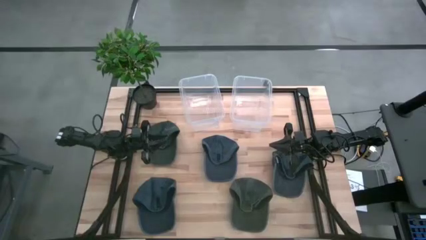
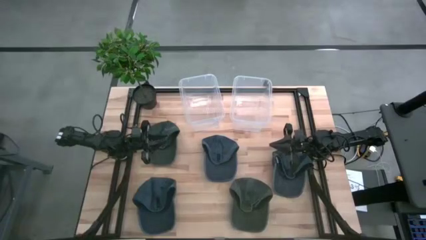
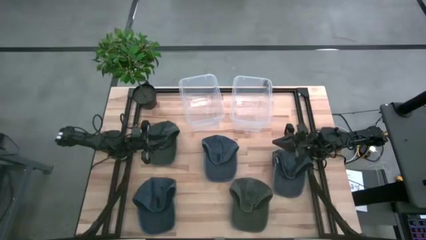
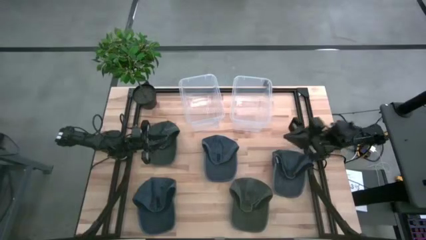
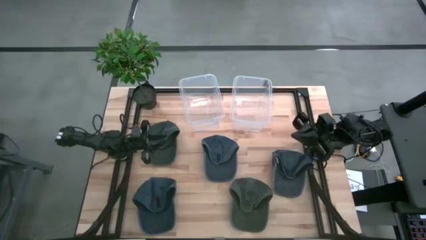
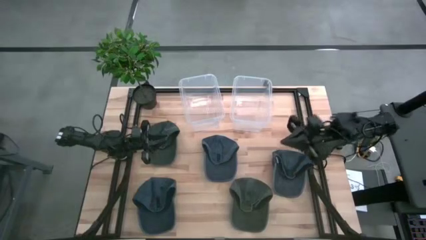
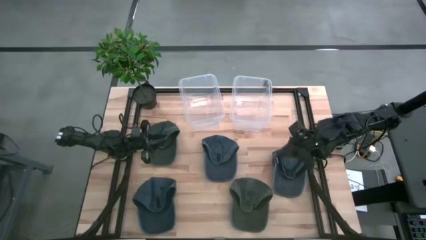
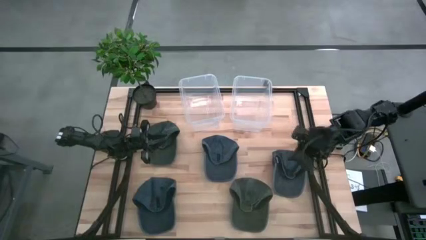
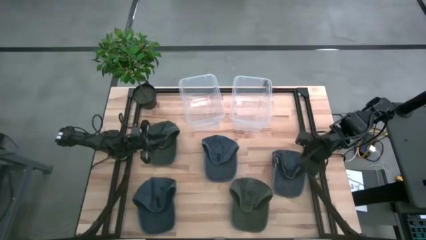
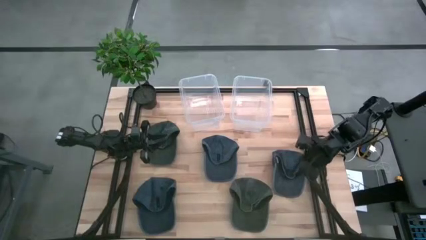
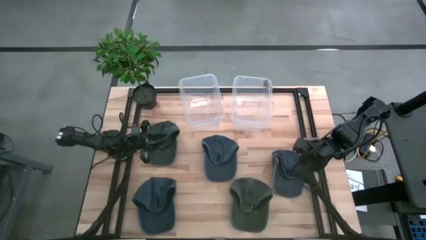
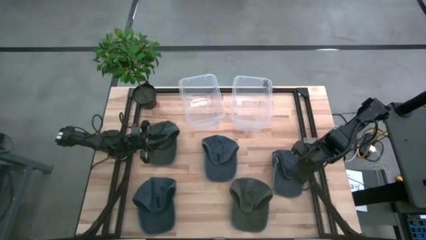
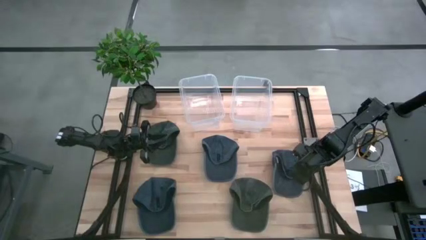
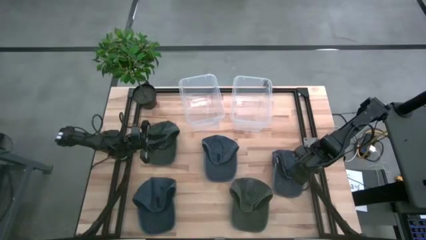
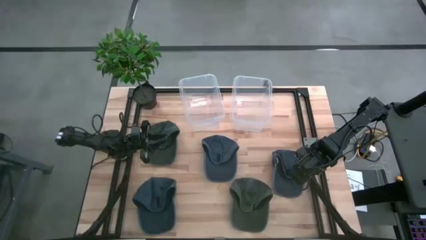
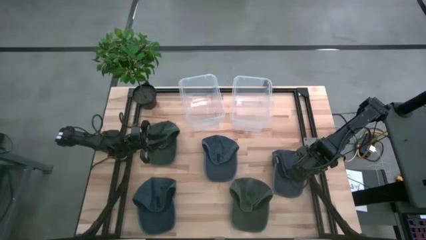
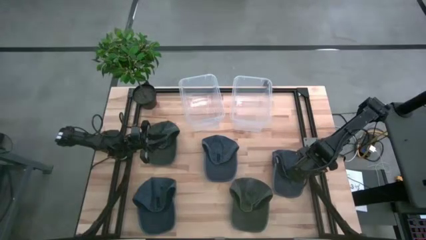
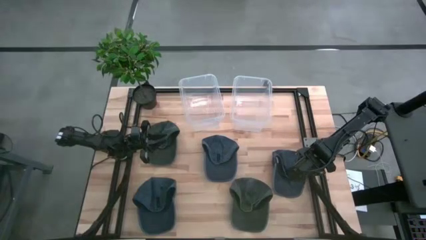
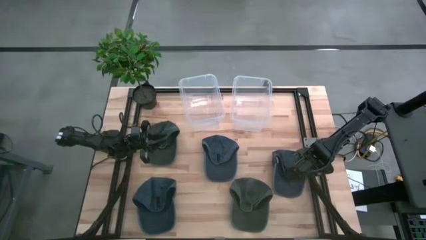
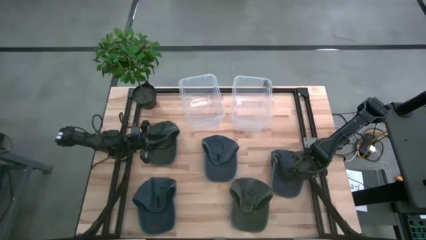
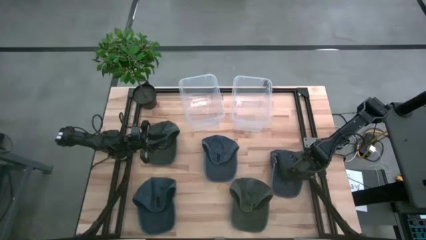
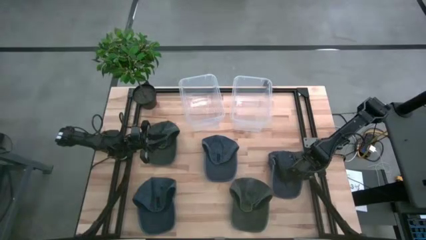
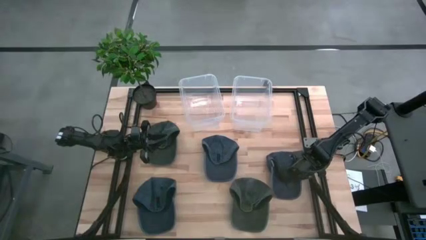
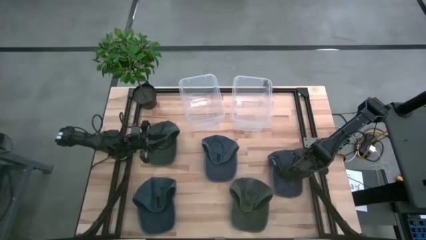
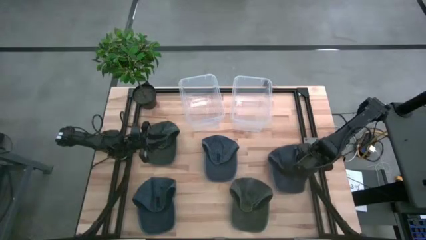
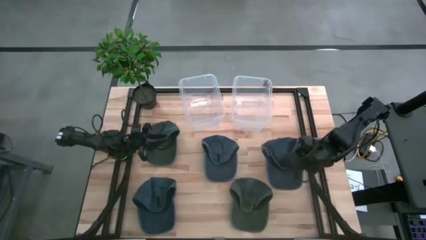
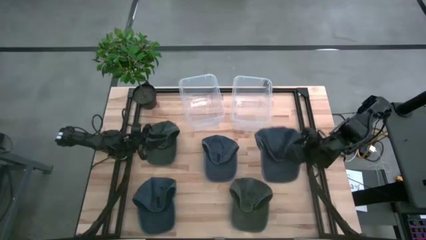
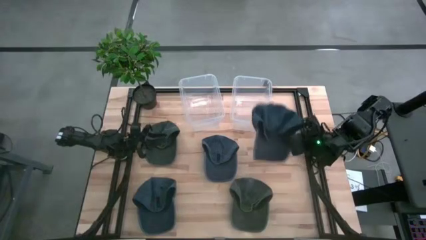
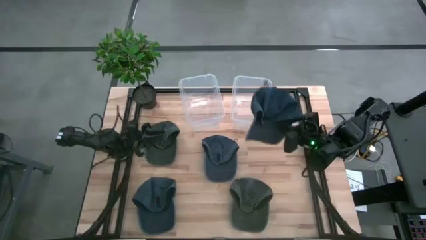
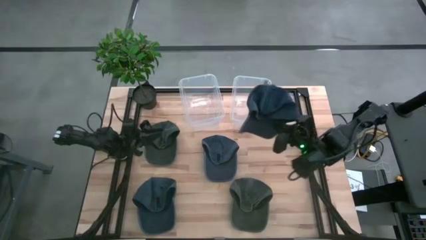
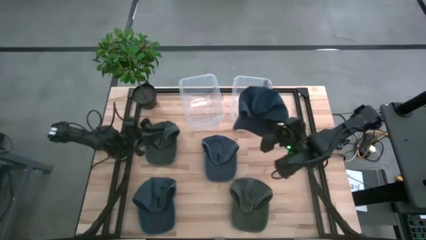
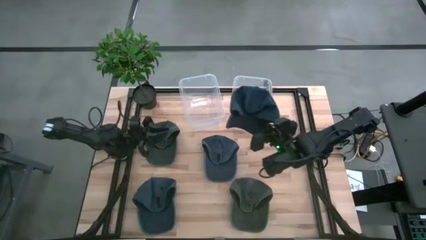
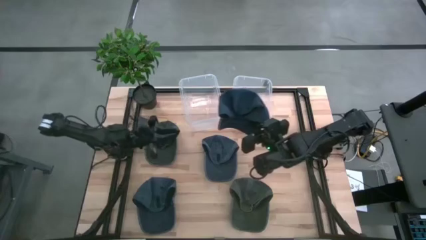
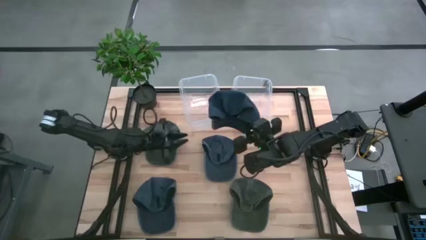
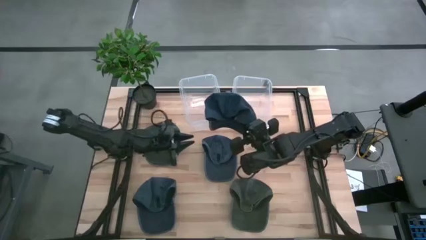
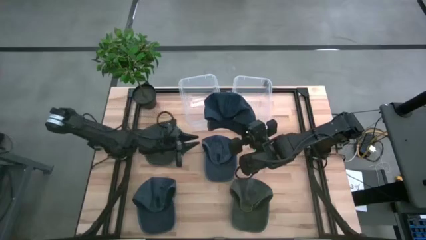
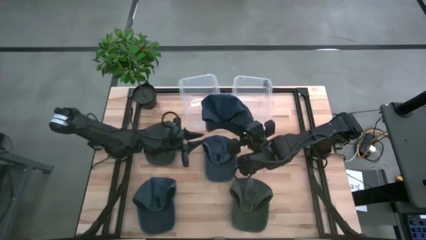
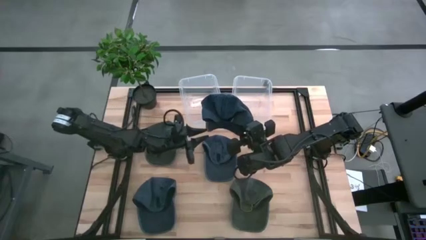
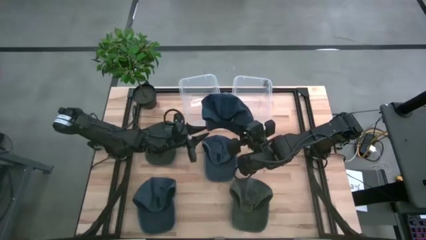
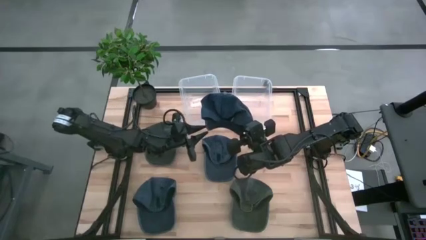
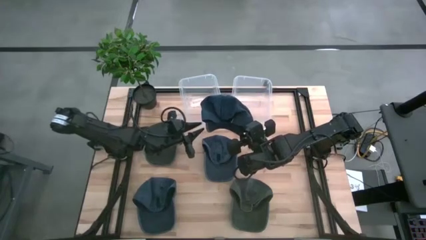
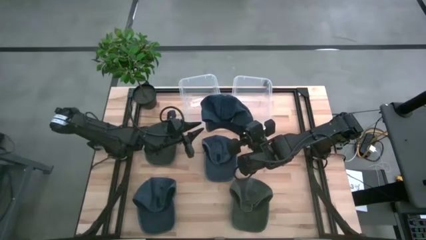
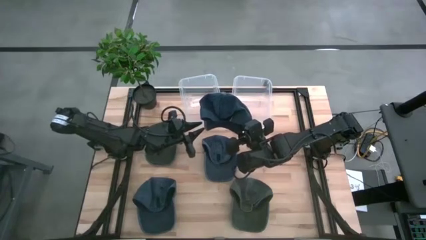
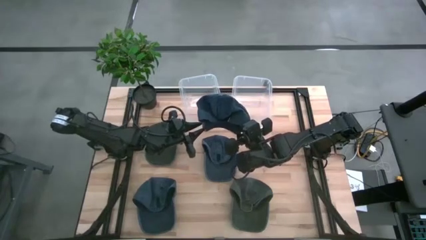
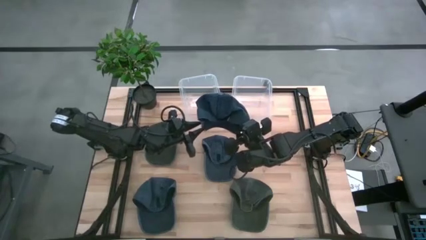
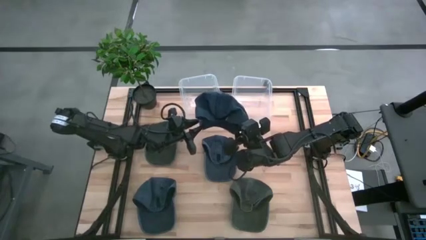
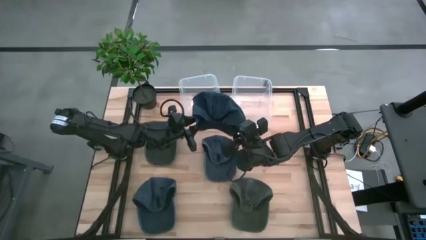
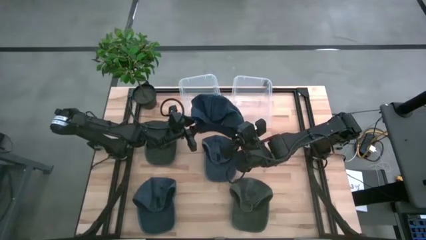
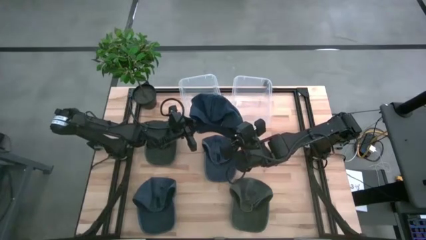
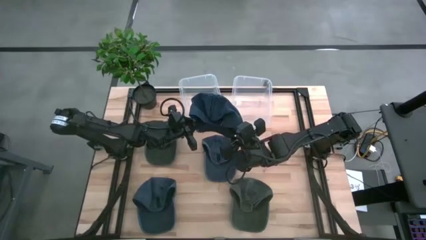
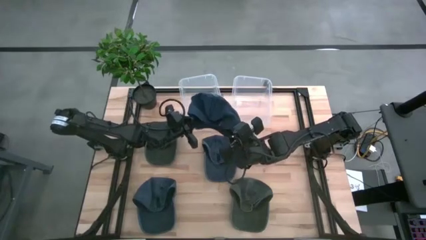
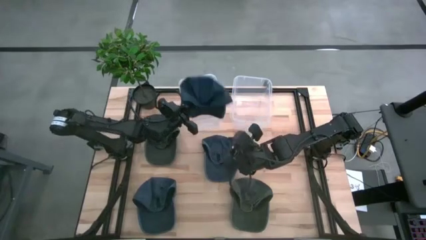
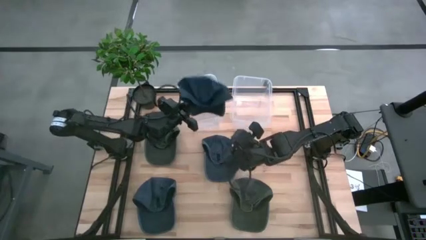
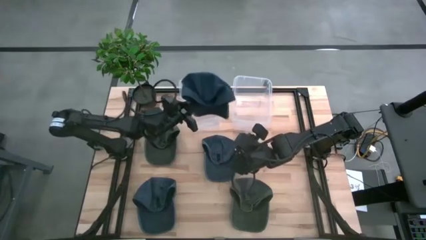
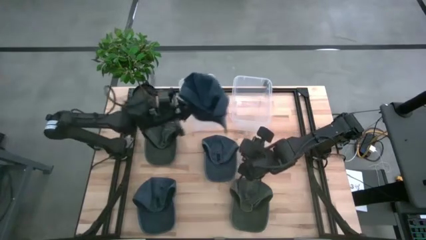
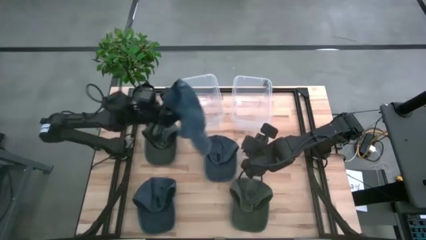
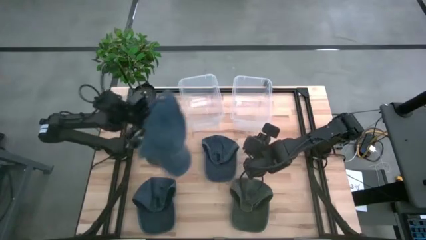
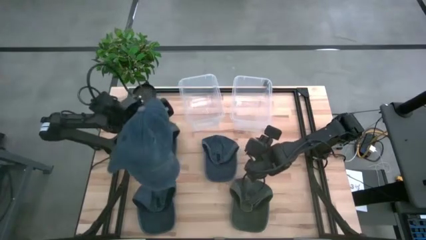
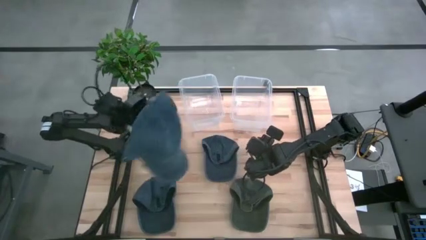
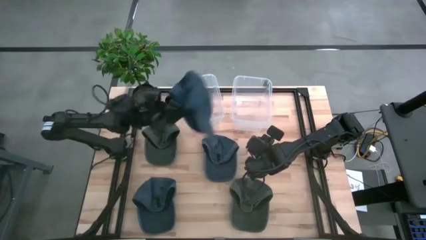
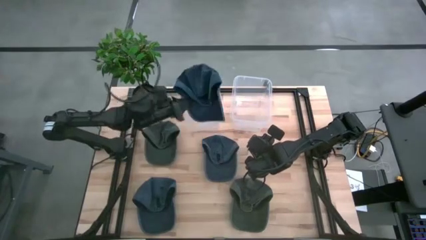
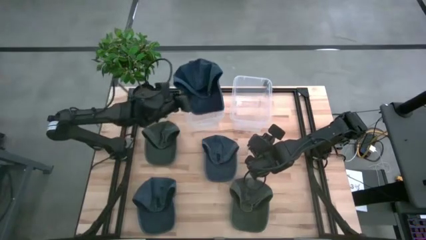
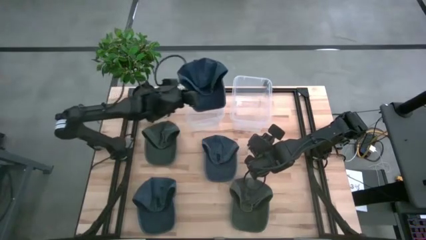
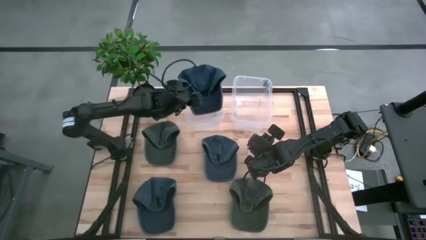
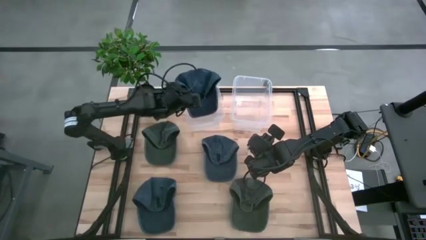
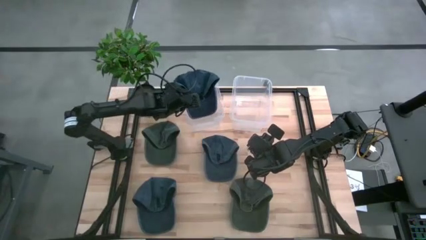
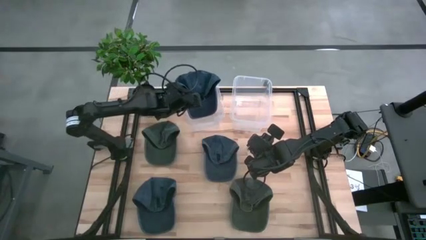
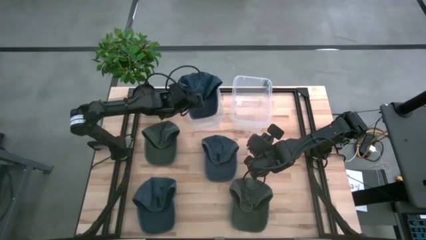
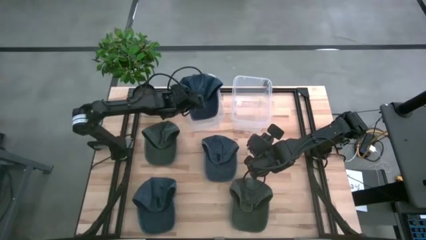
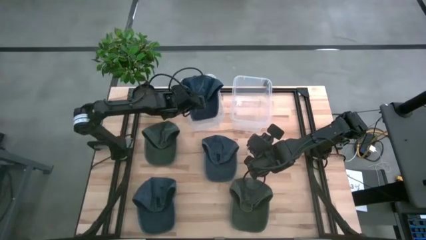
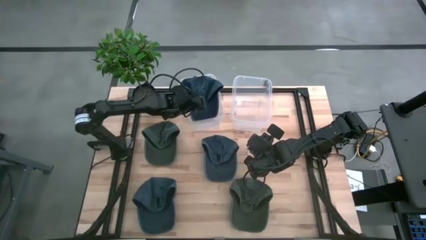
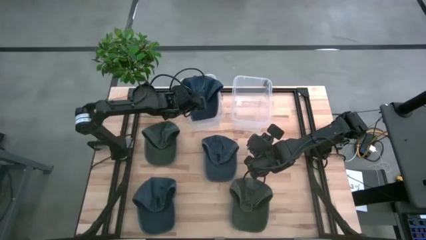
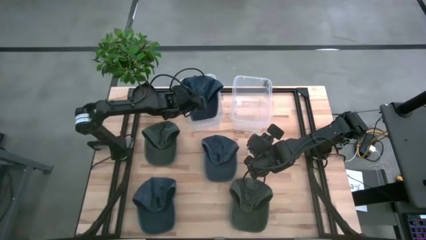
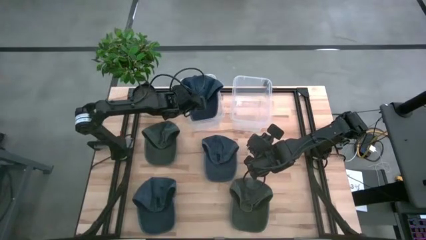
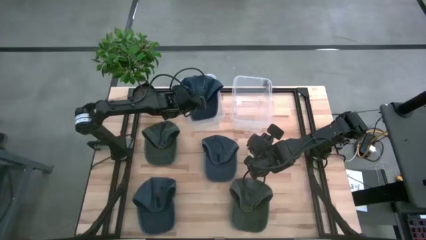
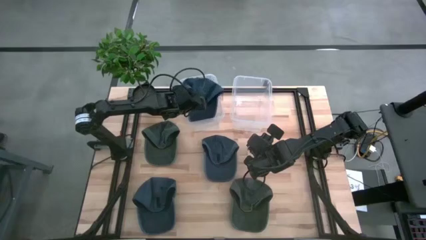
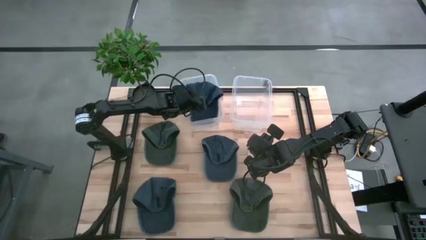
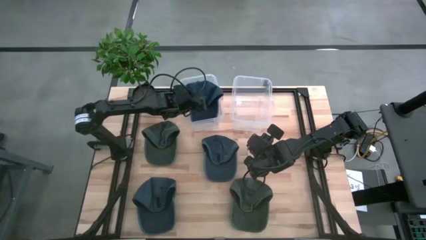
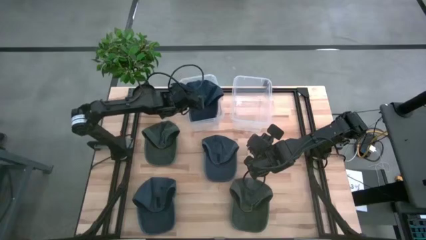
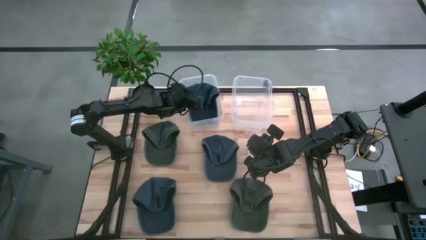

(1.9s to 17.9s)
Task: Pick & Place hat
Put the top right blue cap into the left transparent bin
